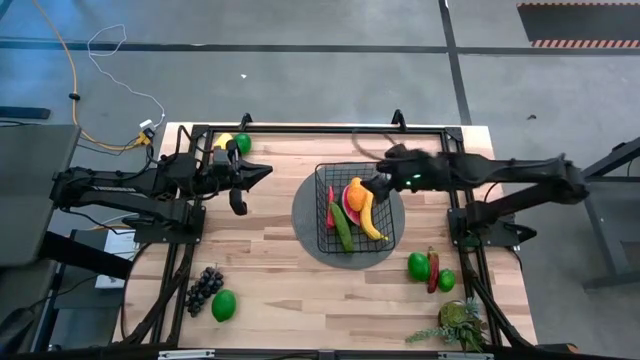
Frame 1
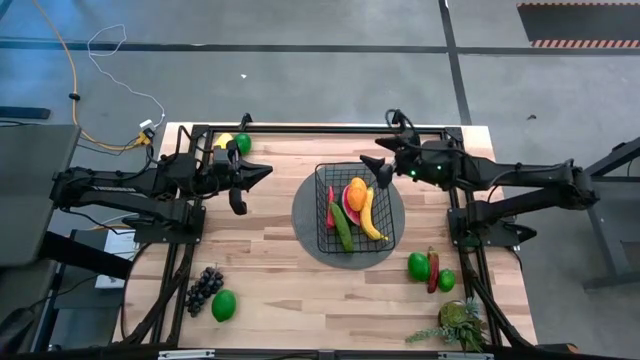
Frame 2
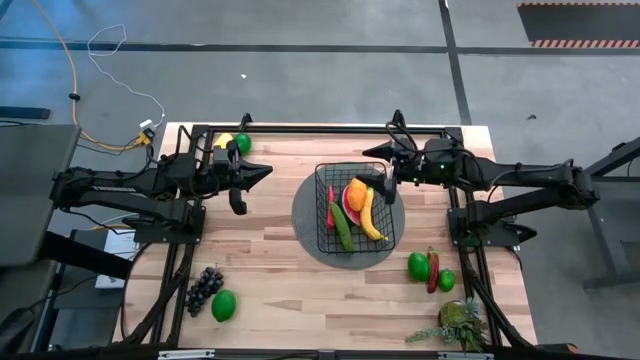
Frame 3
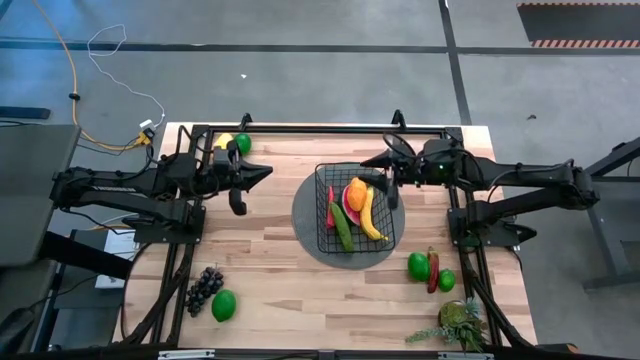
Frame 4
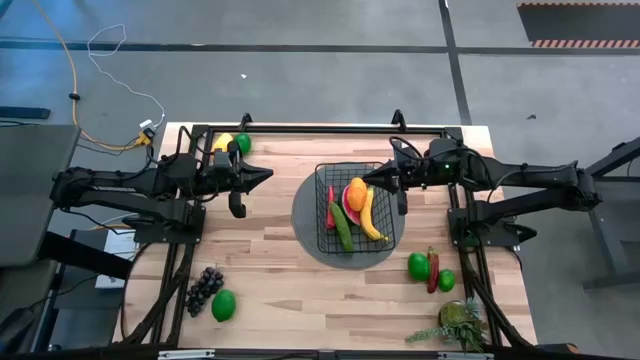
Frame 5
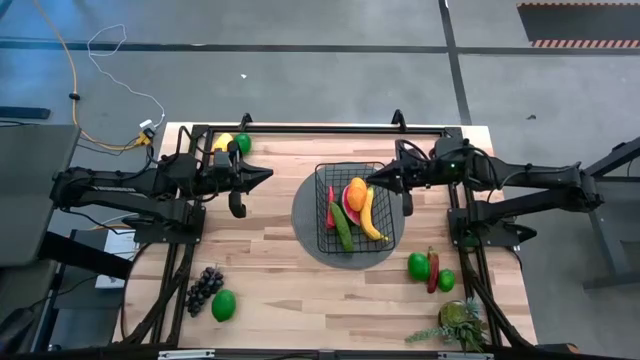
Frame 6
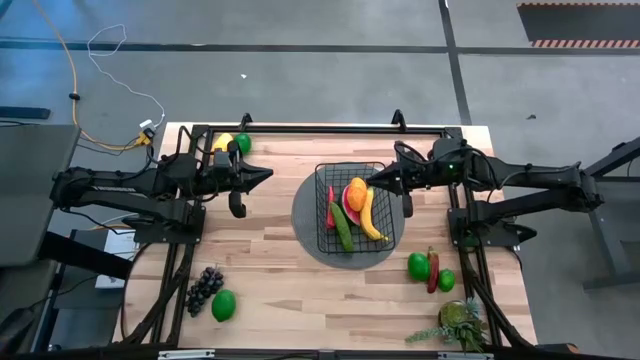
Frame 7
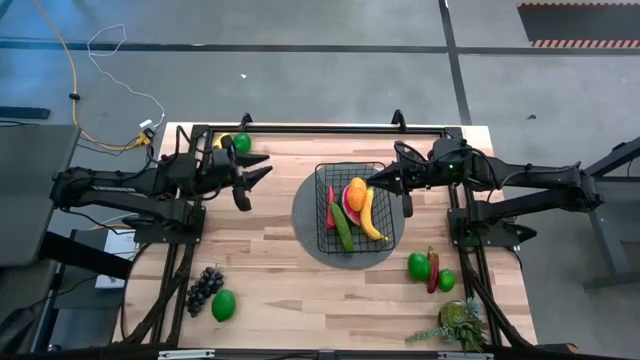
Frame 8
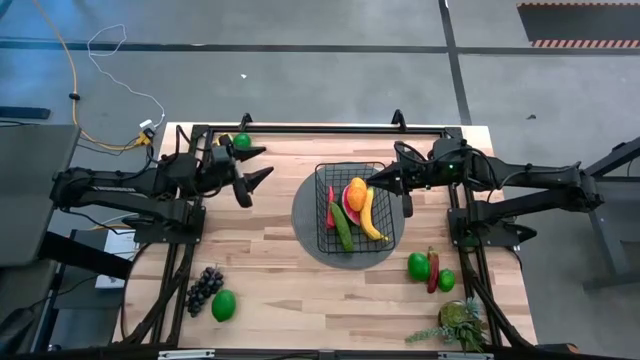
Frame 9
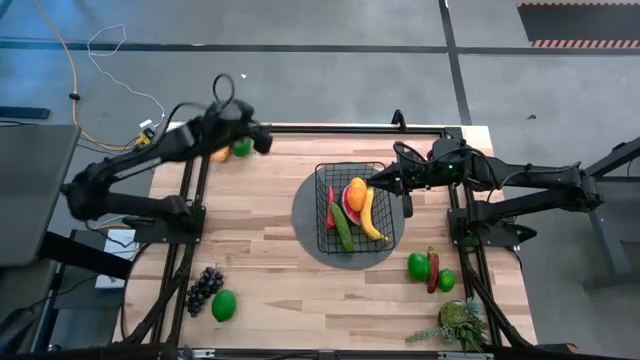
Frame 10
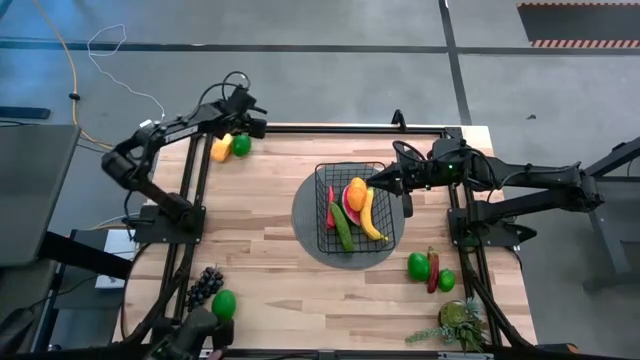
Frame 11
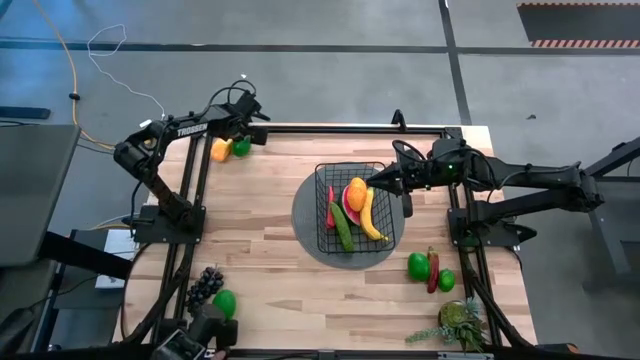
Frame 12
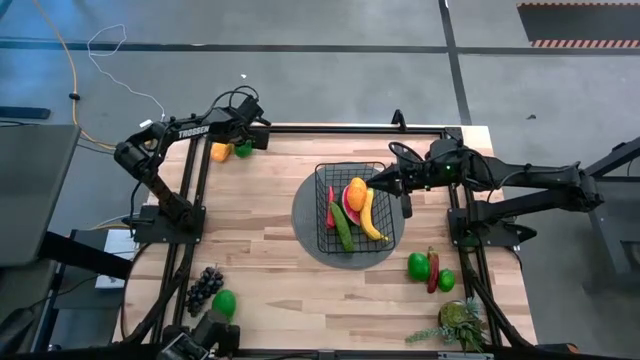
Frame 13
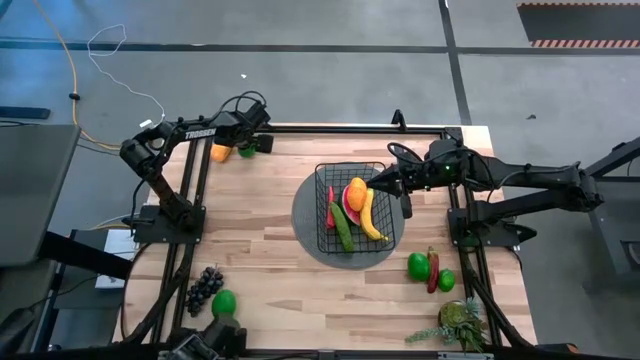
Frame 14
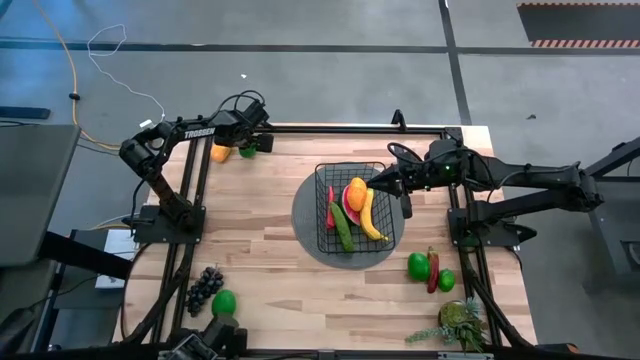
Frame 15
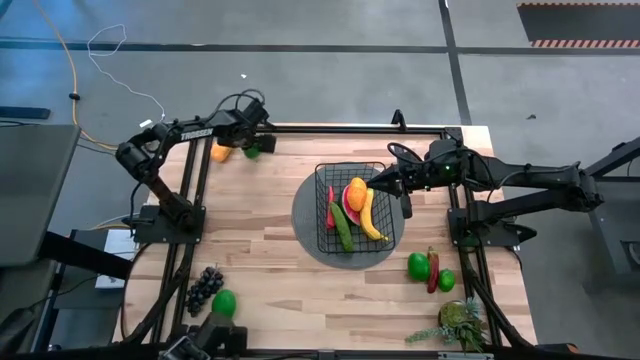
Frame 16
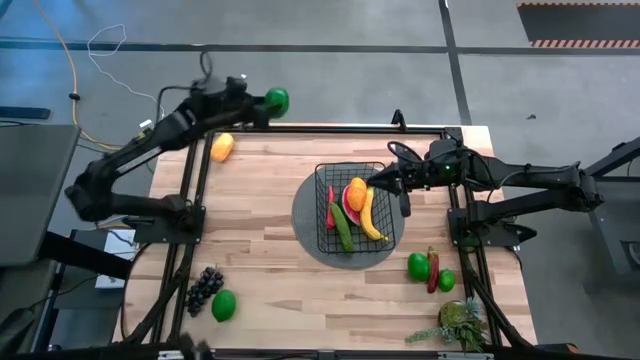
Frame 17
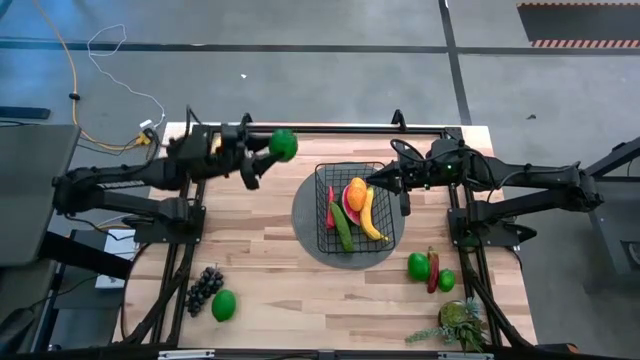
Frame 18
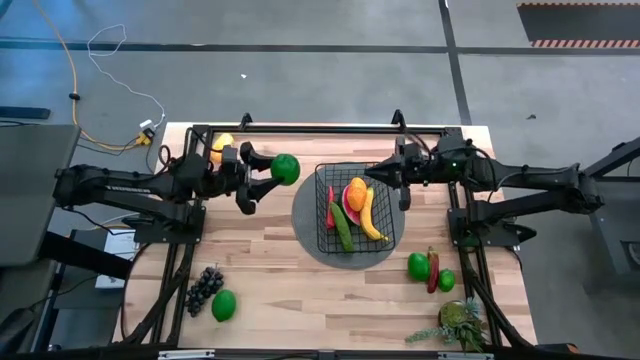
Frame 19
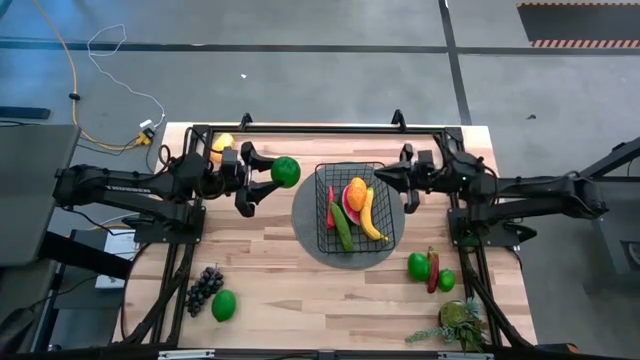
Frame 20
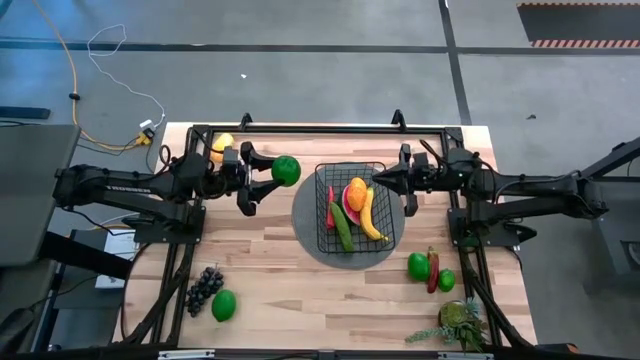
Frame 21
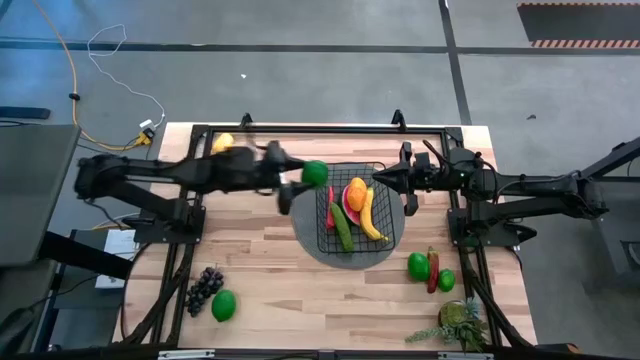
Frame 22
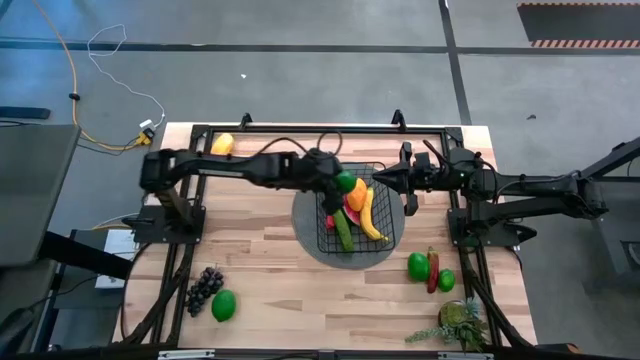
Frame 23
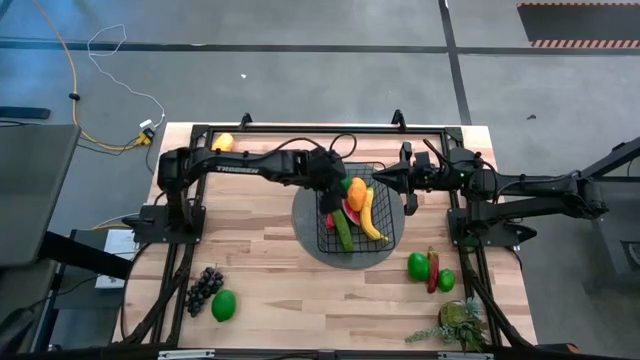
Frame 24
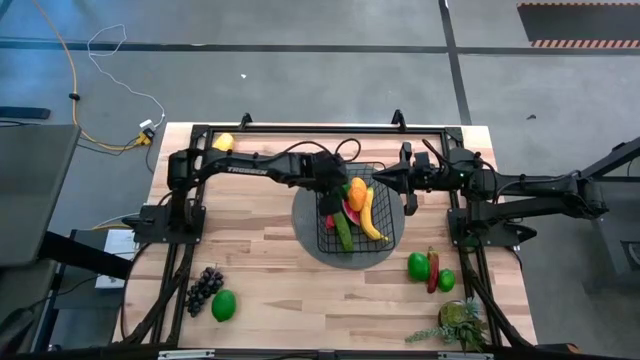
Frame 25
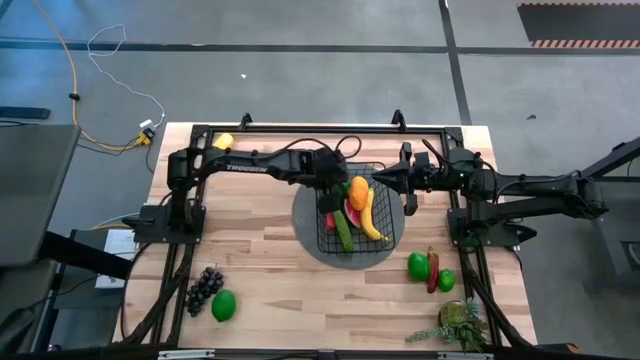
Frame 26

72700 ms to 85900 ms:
Task: Build produce basket
Put the green lime into the black wire basket

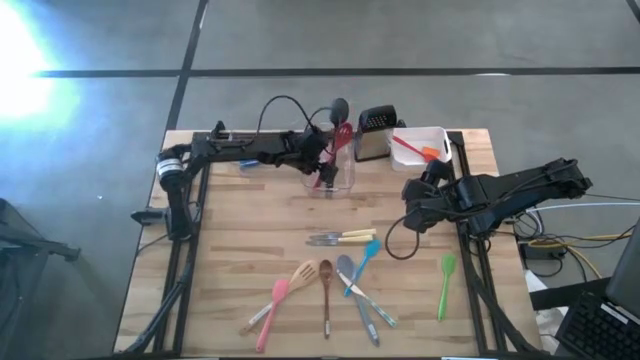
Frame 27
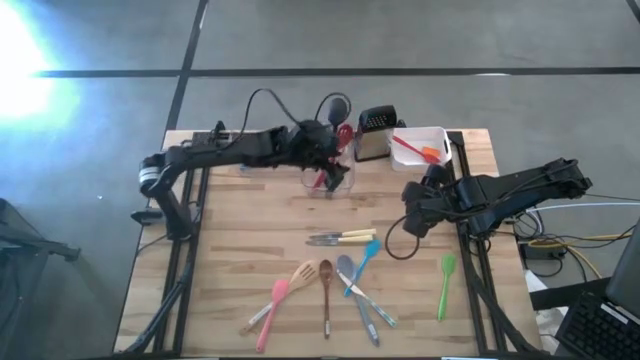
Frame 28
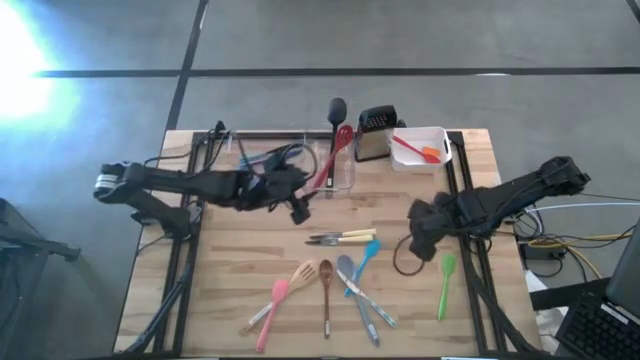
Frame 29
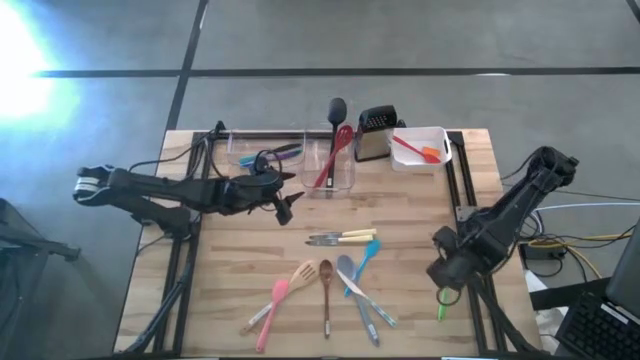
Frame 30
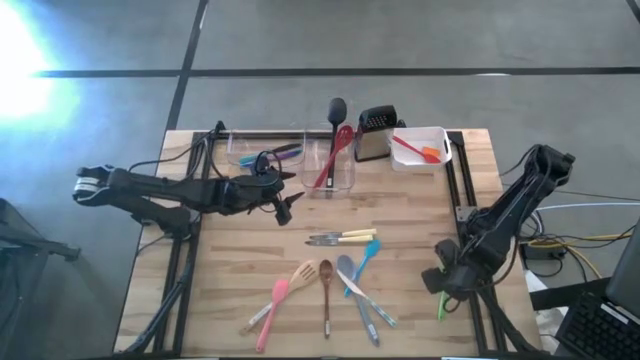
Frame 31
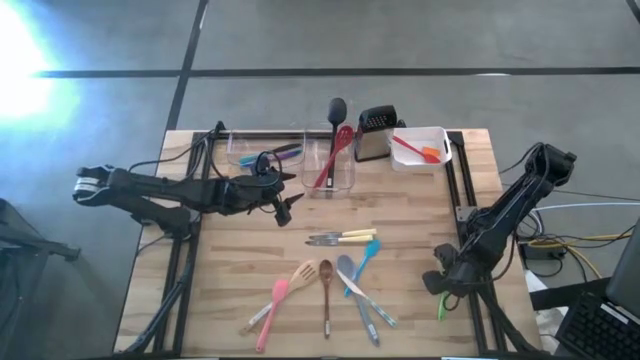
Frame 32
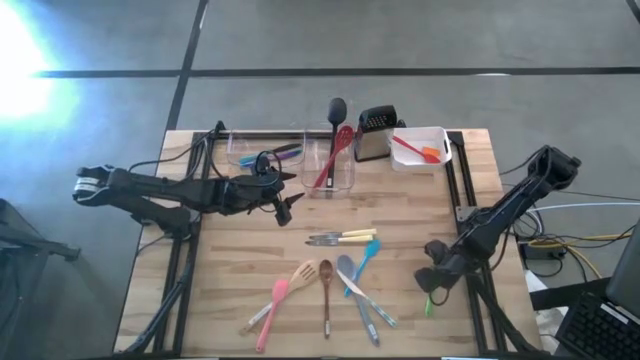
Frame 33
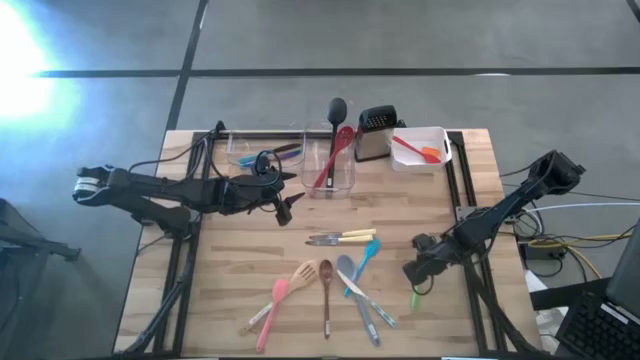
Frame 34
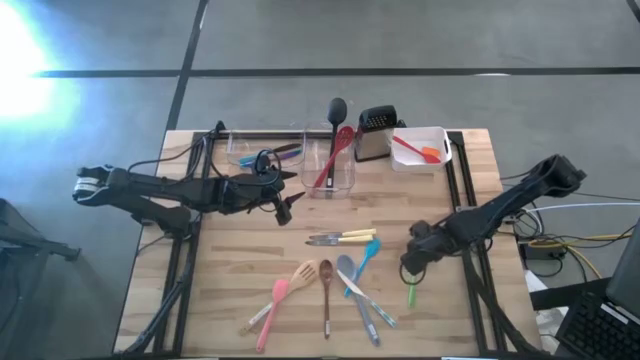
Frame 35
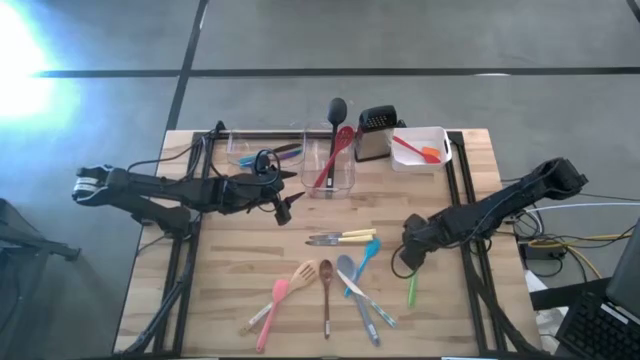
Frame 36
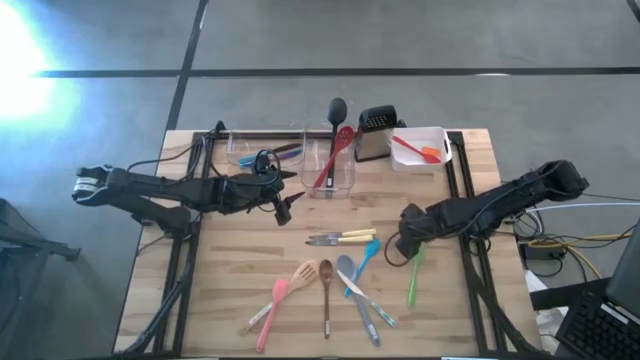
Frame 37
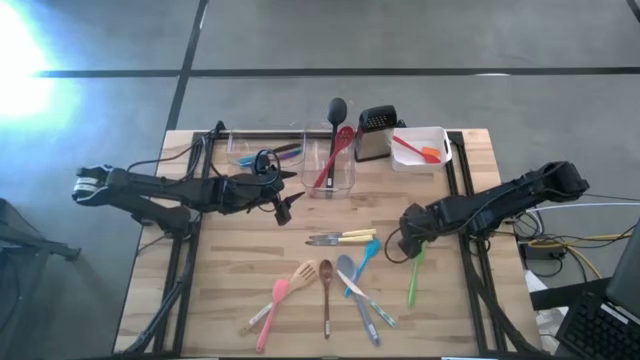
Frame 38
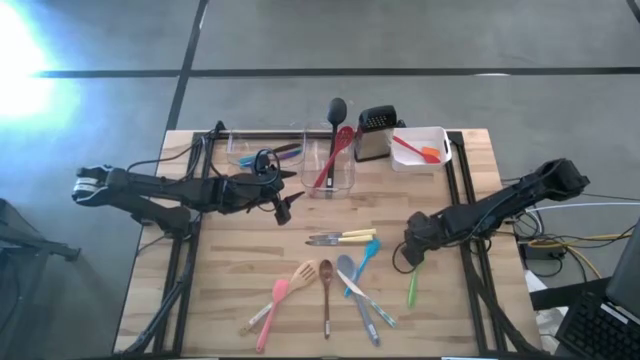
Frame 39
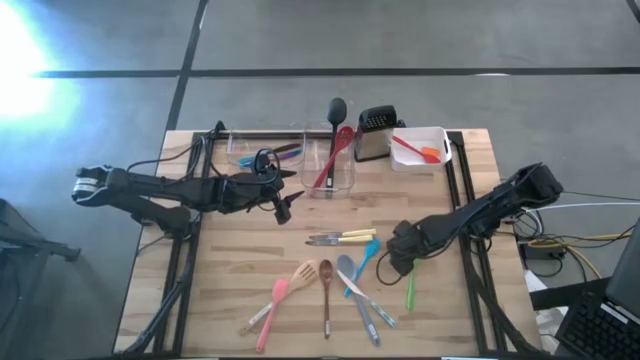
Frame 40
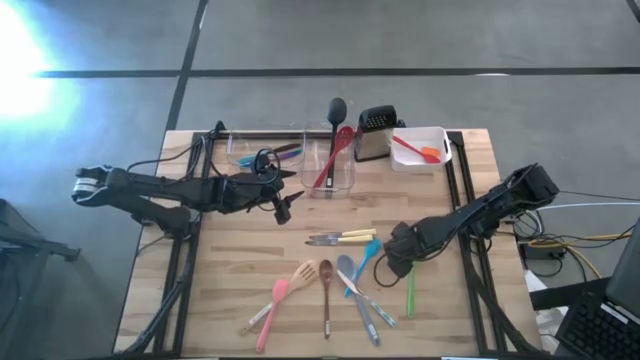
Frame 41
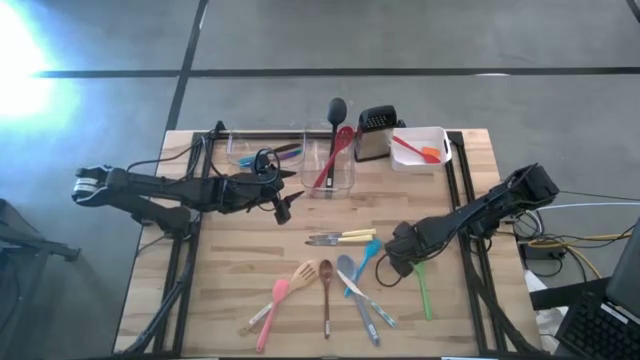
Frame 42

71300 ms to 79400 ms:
Task: Pick & Place Kitchen Items
Put the green spatula into the white bin
